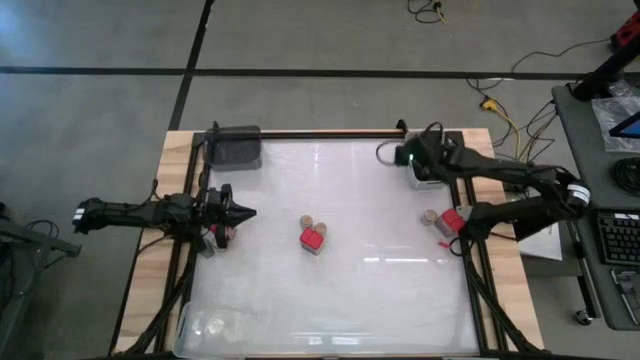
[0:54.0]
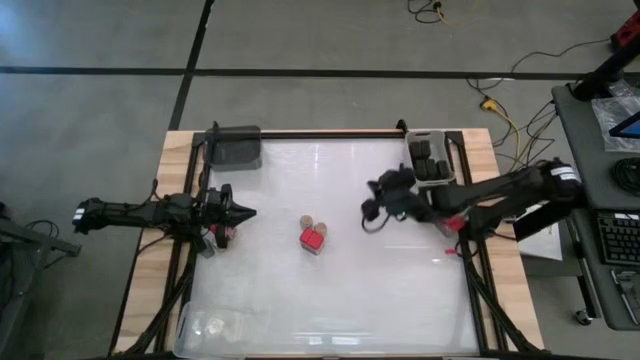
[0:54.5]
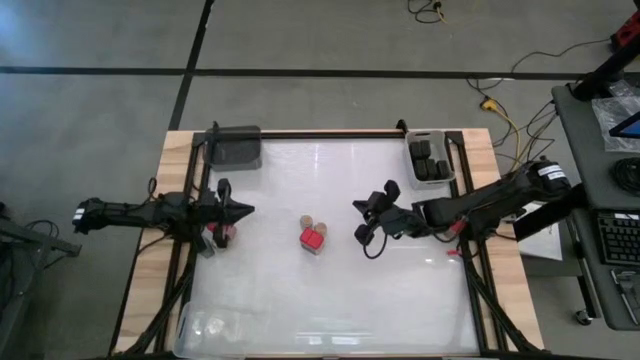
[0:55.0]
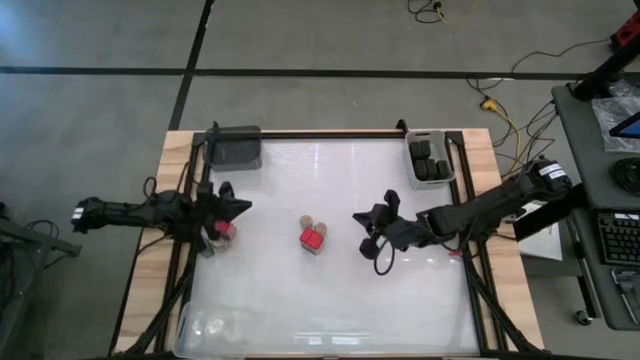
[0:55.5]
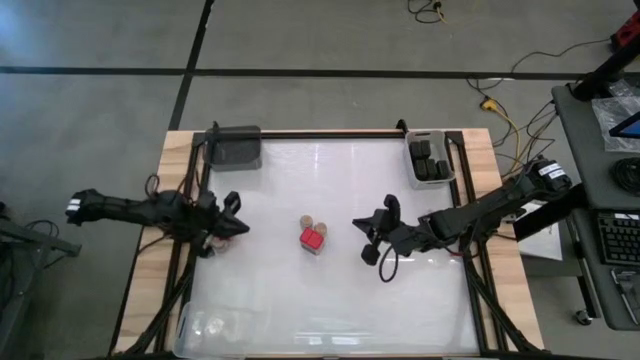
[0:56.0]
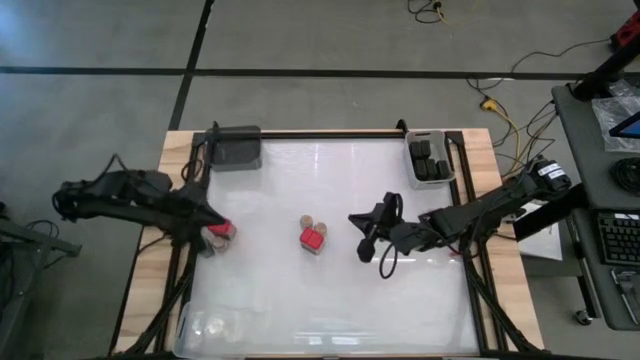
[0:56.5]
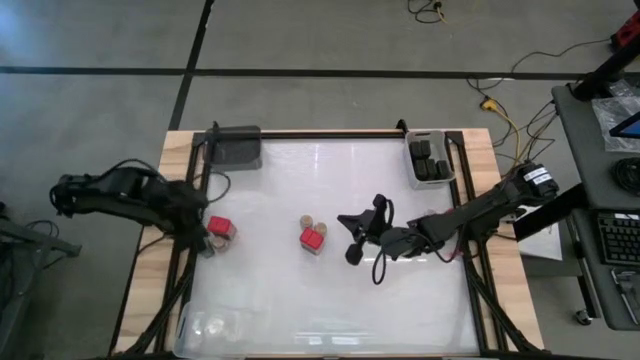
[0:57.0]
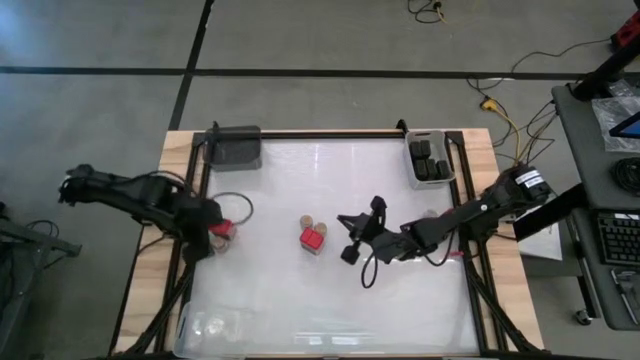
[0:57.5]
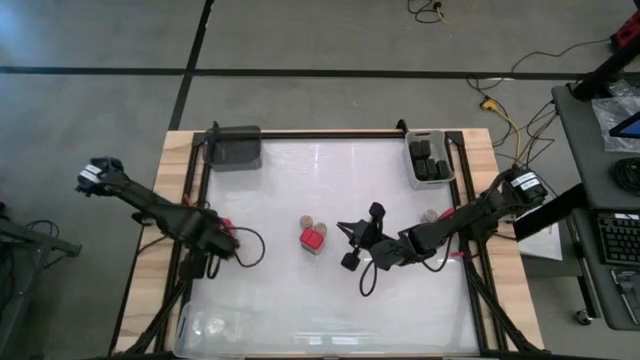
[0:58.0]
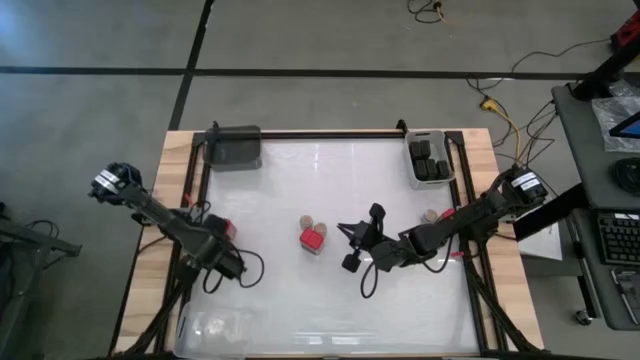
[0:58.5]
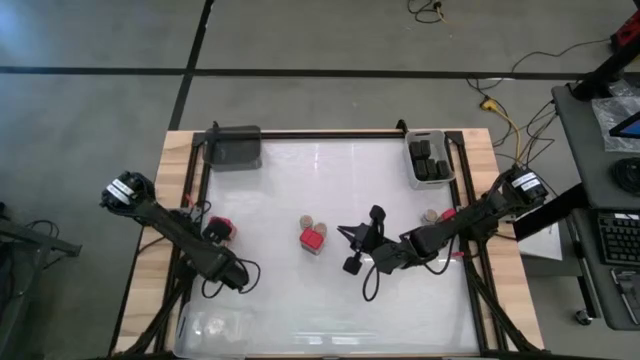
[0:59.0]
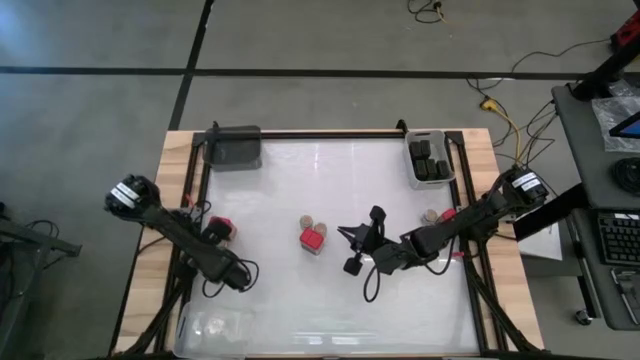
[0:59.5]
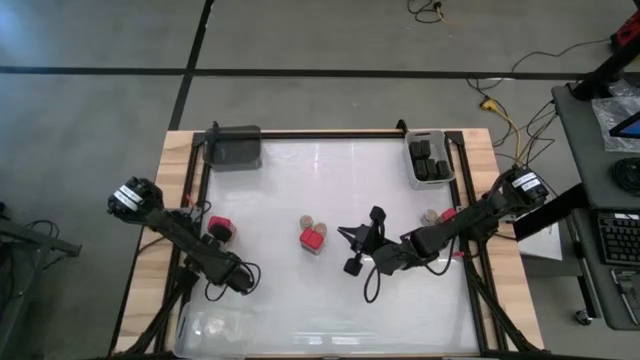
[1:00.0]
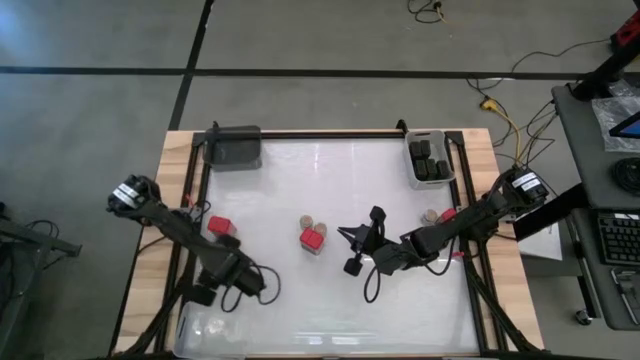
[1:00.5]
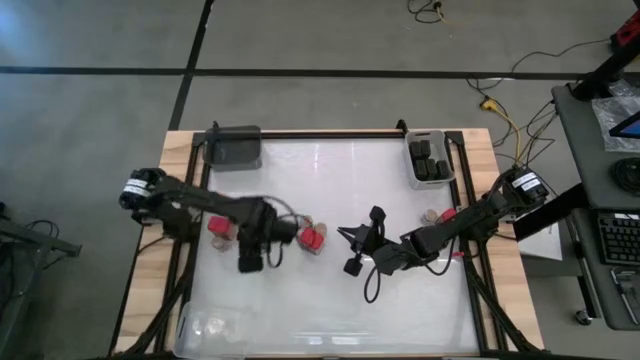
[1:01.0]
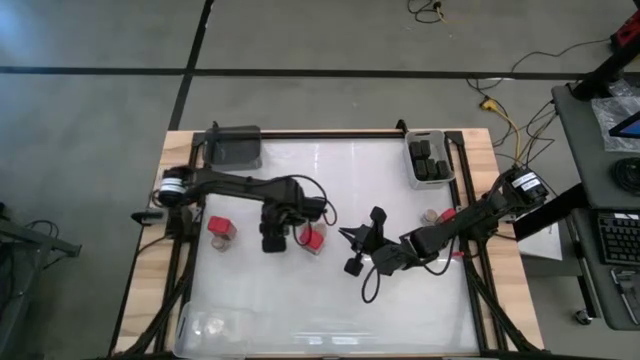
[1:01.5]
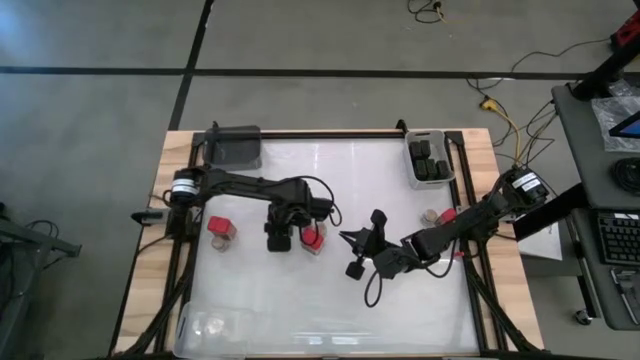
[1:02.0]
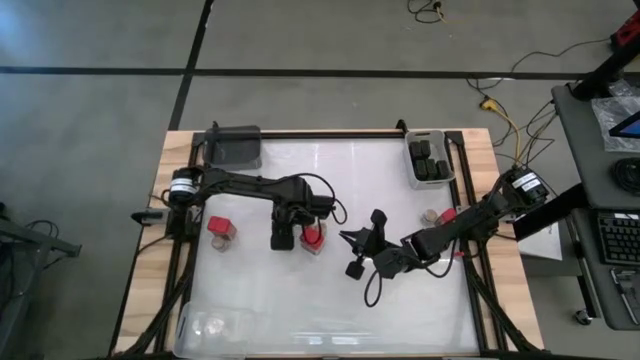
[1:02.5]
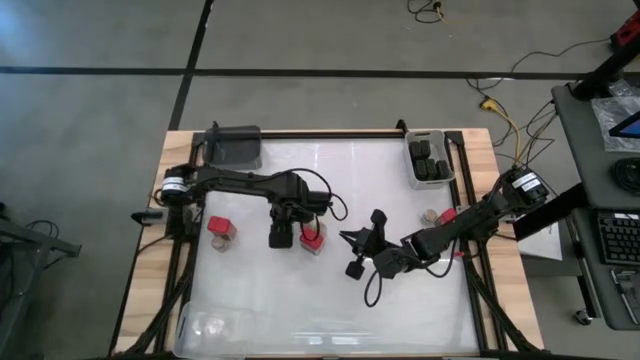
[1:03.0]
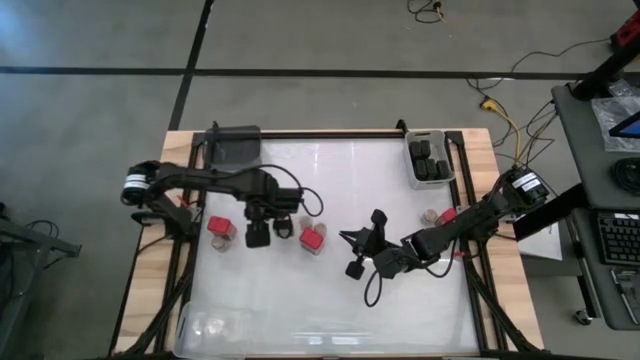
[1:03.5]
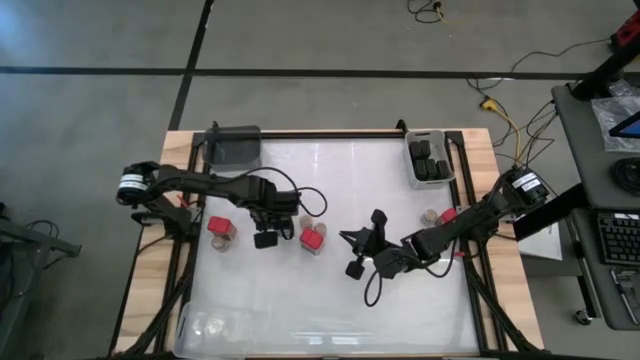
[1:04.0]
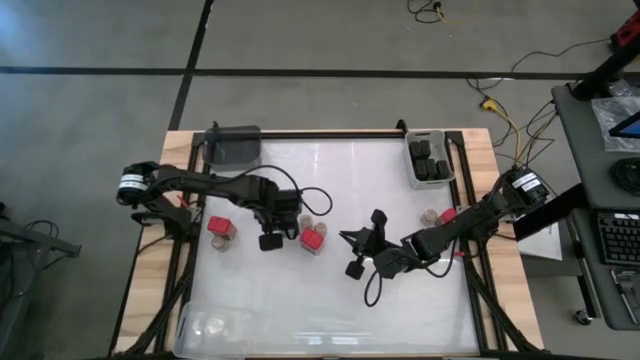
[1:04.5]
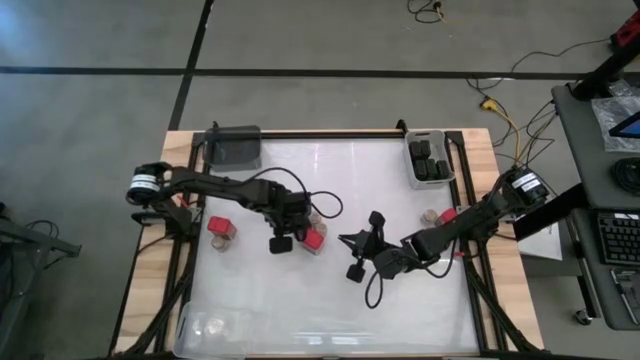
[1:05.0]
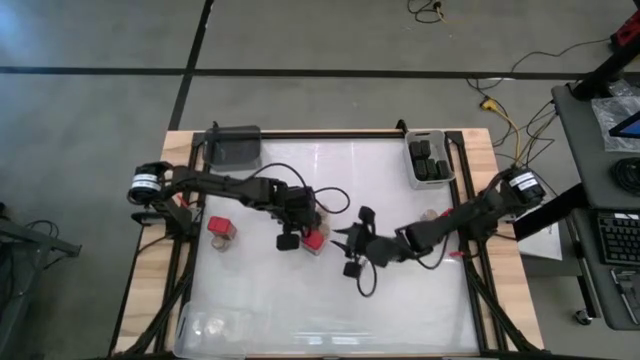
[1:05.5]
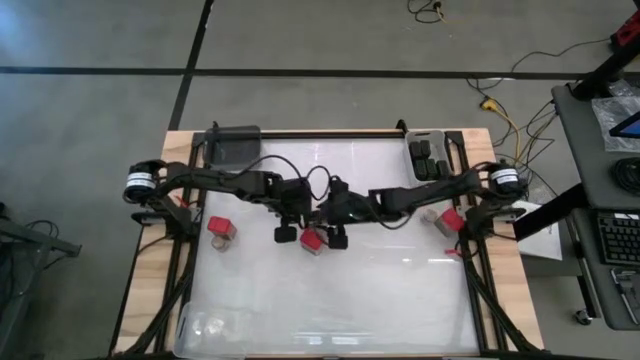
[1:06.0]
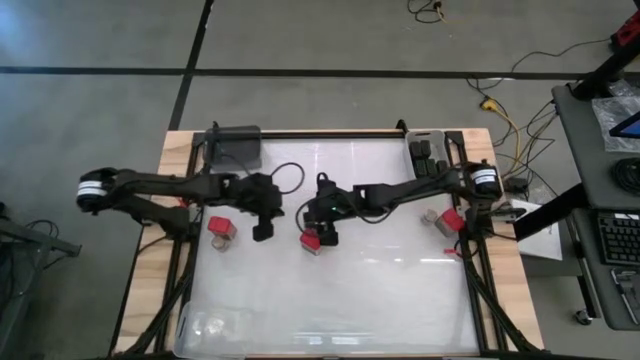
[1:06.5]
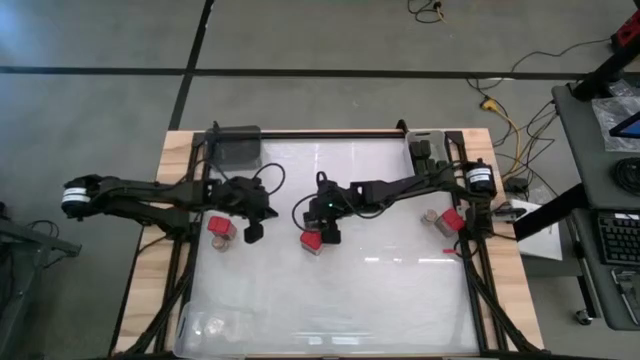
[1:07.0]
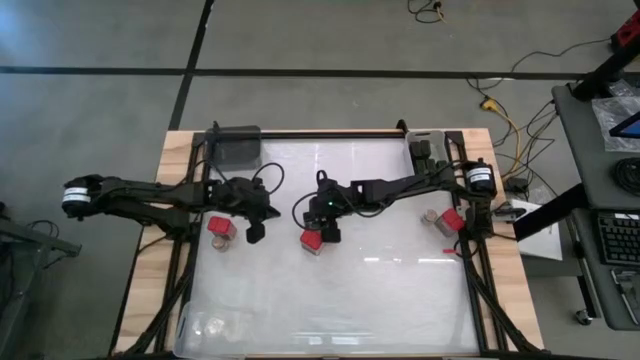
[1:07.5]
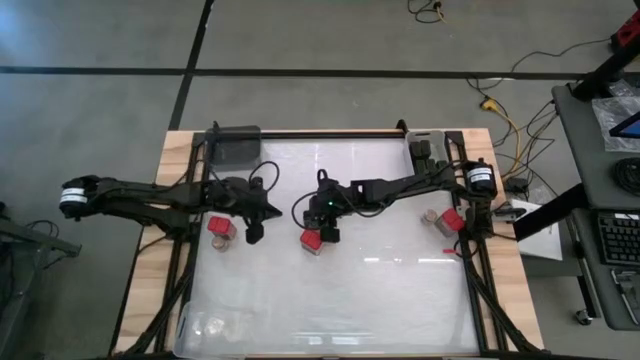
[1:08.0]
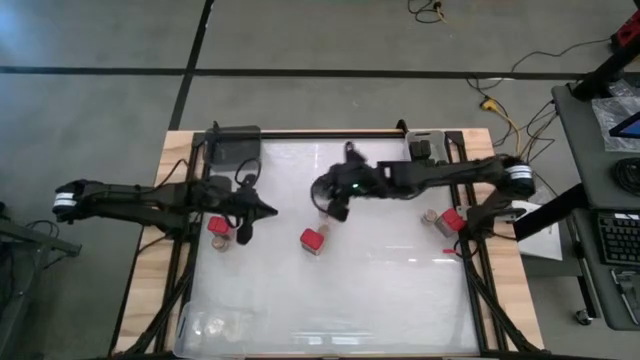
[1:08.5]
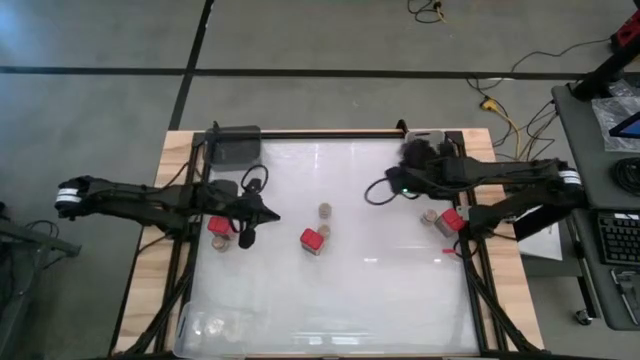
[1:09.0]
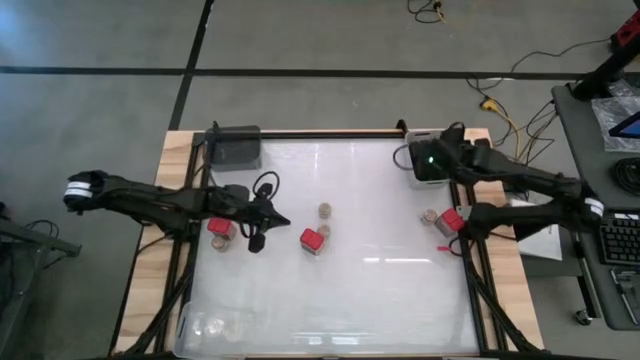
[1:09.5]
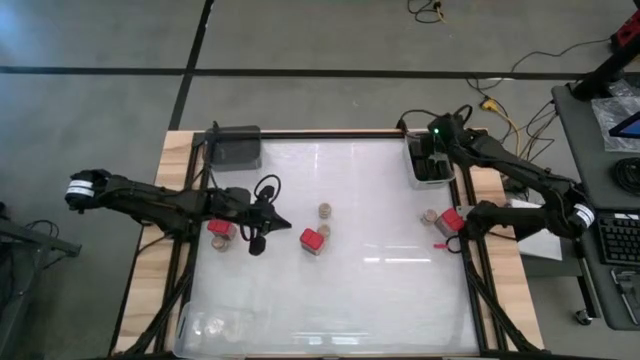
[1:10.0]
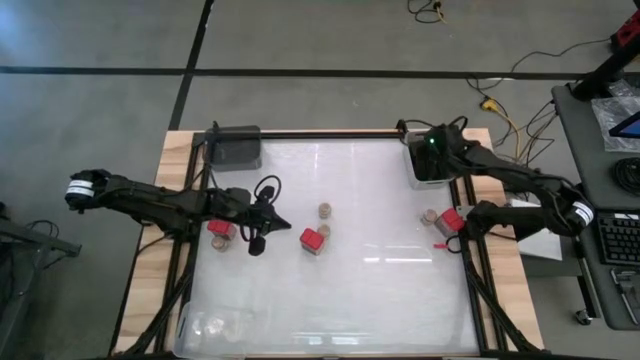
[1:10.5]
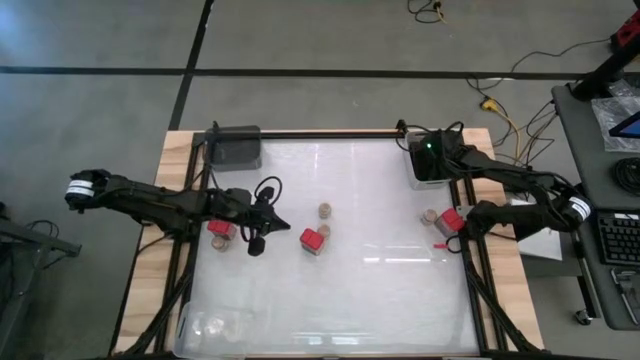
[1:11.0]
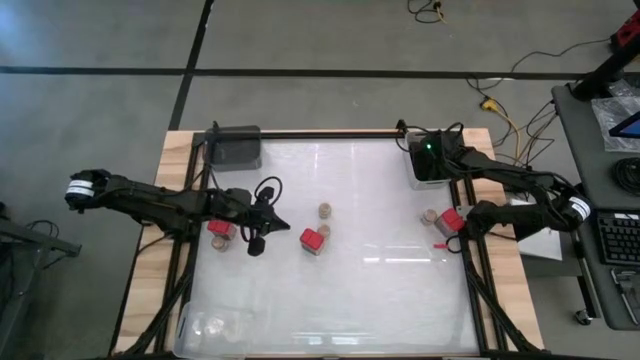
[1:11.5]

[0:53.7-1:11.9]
Task: Sort spices by type
Put the black seasoning can into the gray bin
